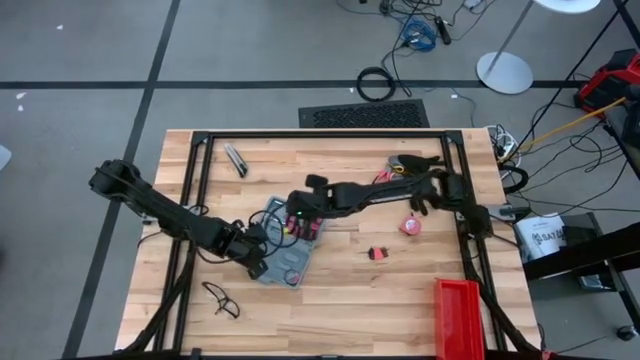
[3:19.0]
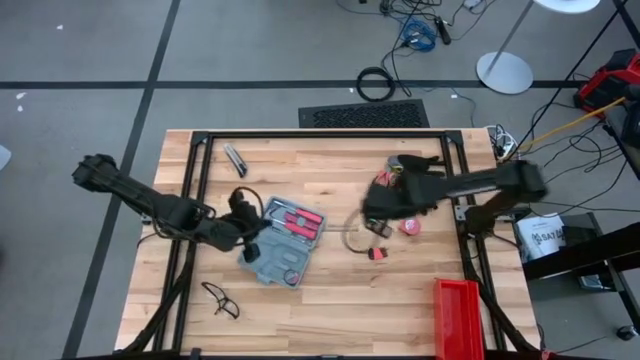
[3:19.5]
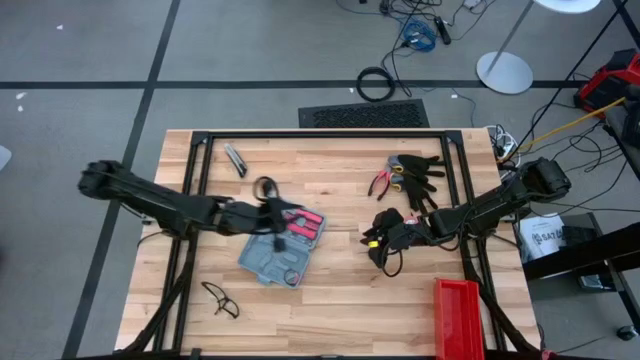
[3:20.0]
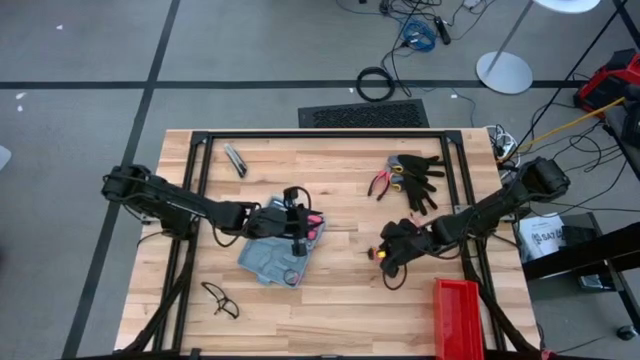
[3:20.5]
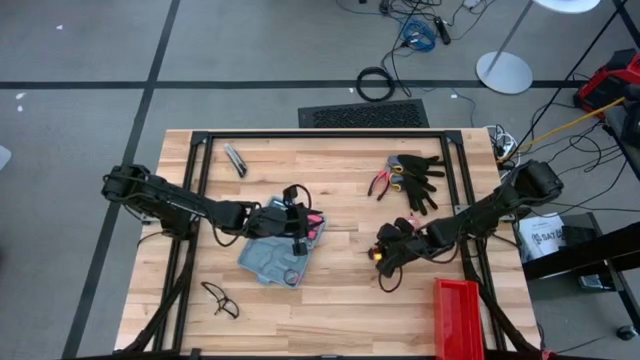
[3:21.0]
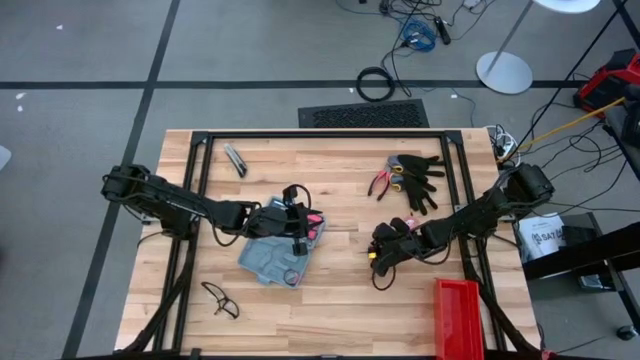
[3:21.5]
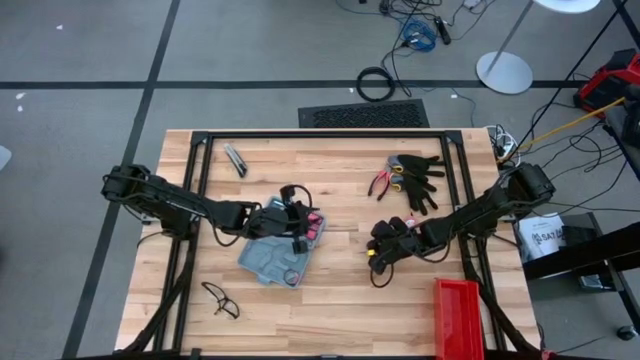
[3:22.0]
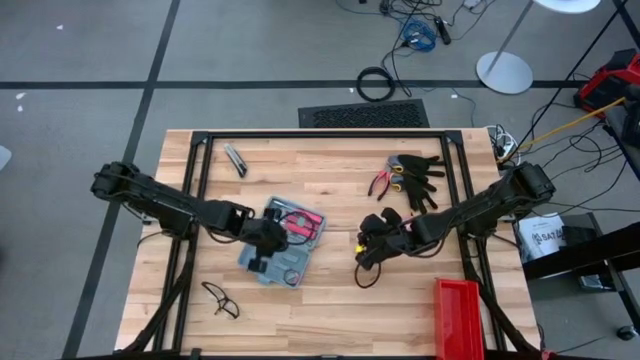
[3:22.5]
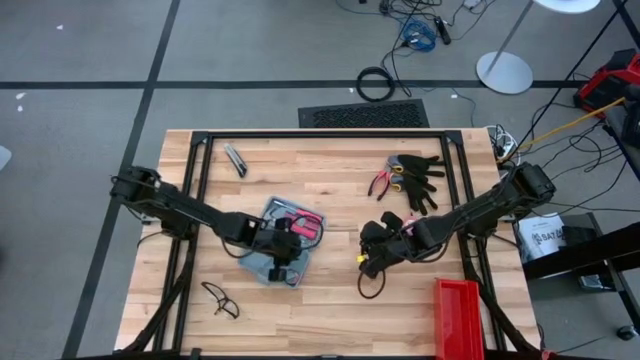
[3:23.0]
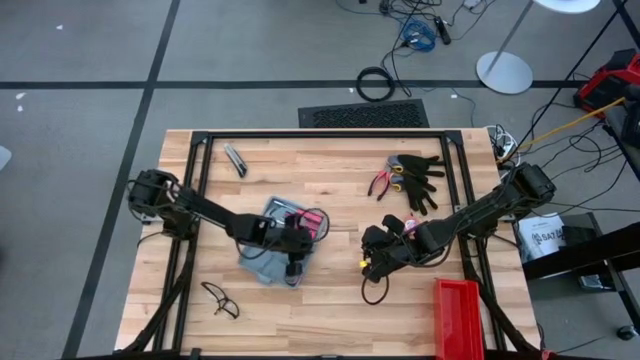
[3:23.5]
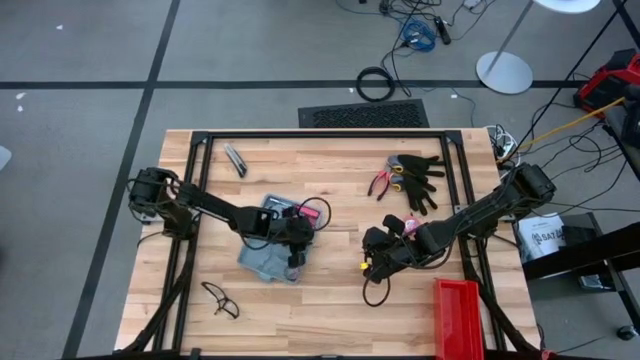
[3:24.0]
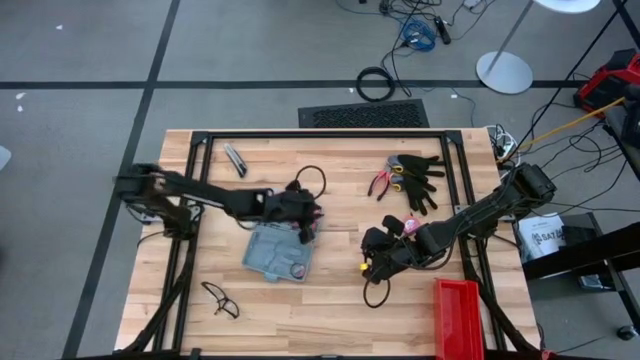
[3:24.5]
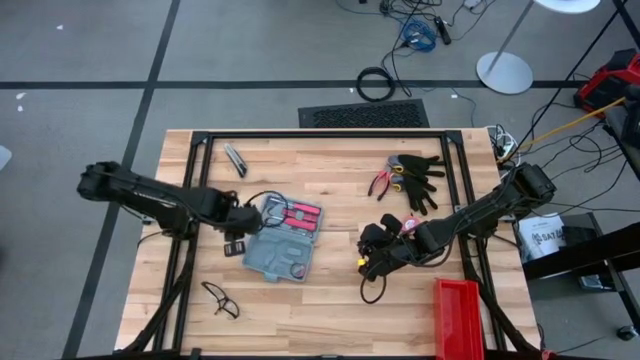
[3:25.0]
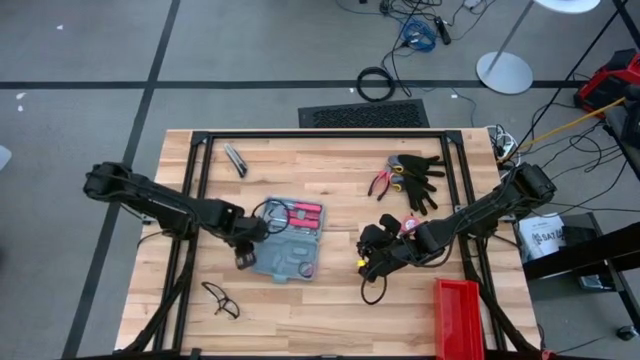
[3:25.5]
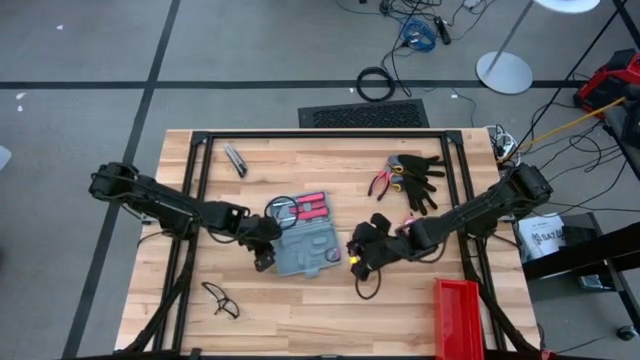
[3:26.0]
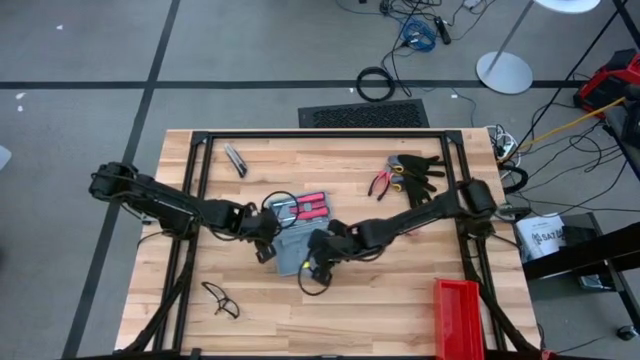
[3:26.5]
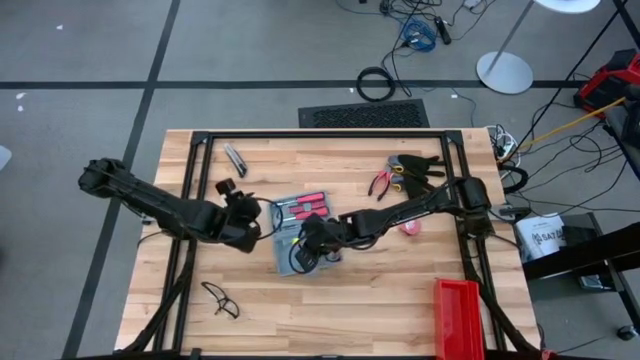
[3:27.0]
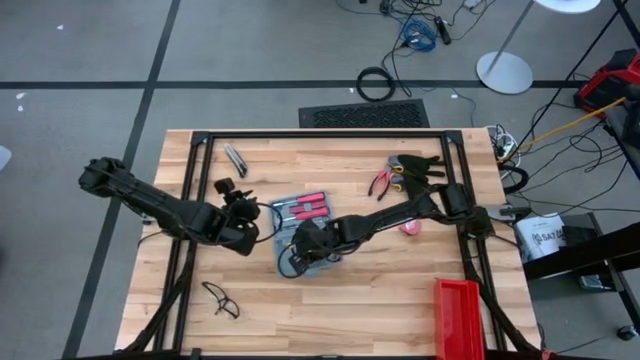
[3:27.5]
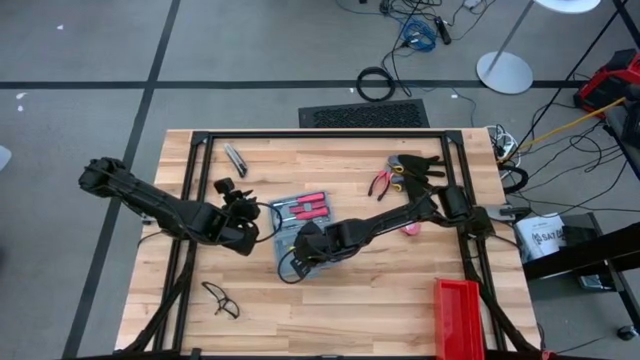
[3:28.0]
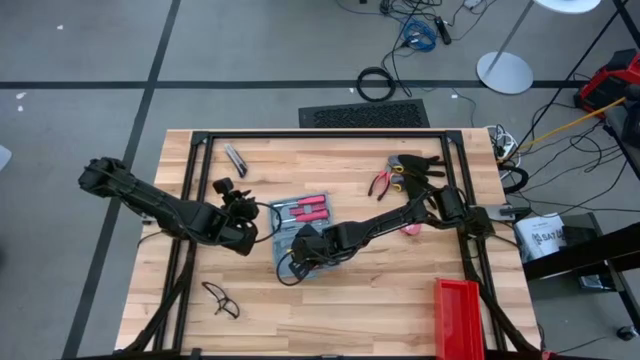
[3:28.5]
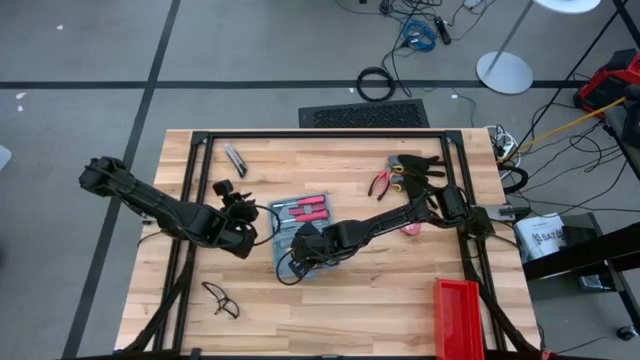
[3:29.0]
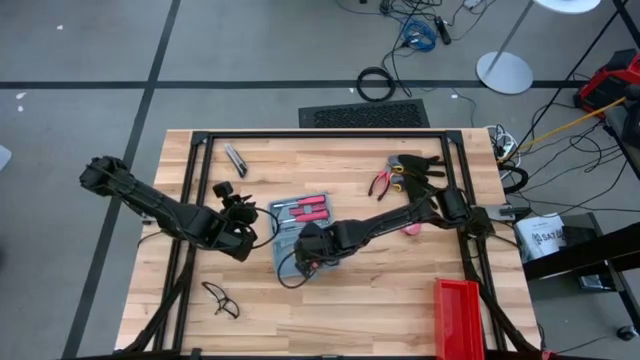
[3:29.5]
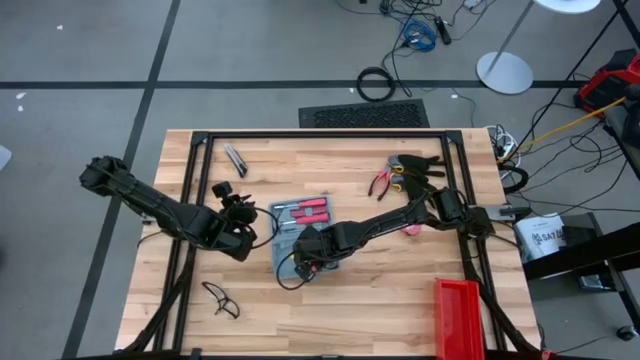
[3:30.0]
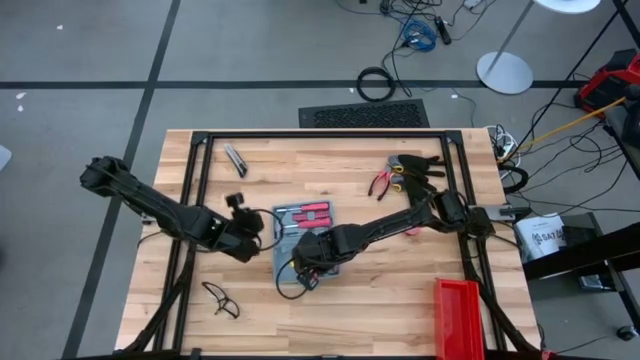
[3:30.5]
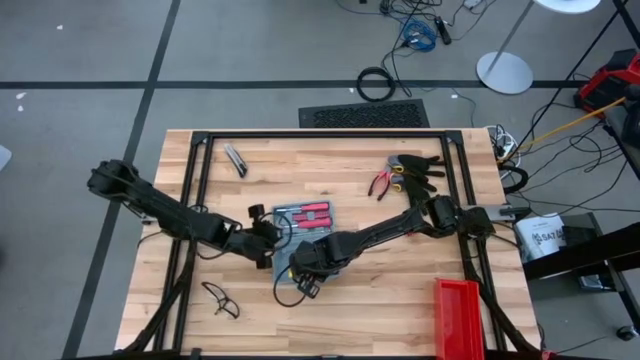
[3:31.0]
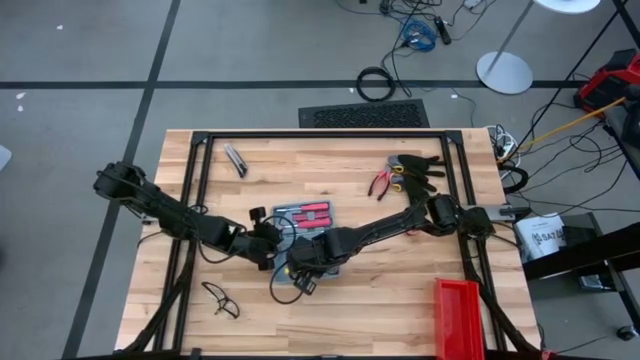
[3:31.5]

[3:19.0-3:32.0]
Task: prefit tool cases
Put the pink hex key into the gray prefit tool case

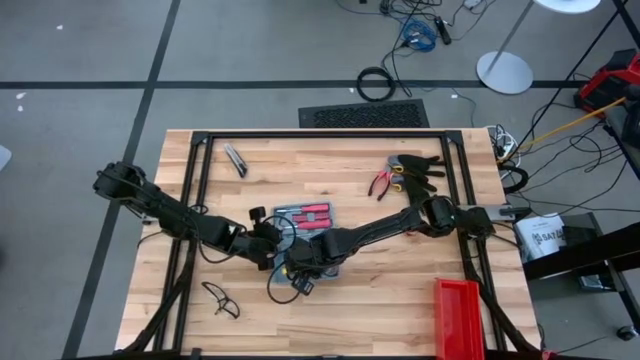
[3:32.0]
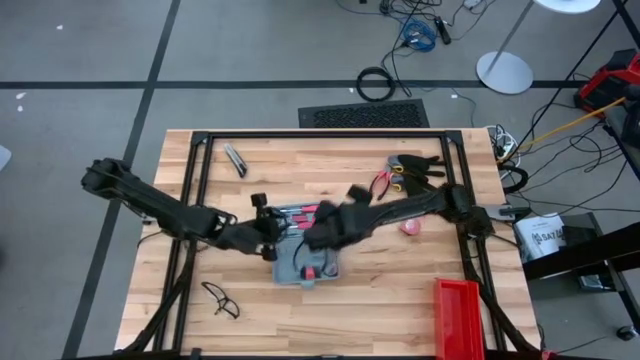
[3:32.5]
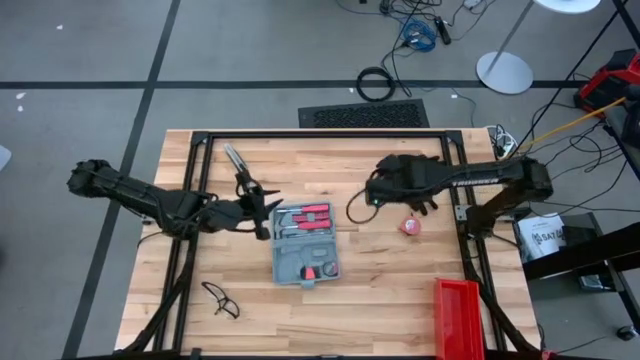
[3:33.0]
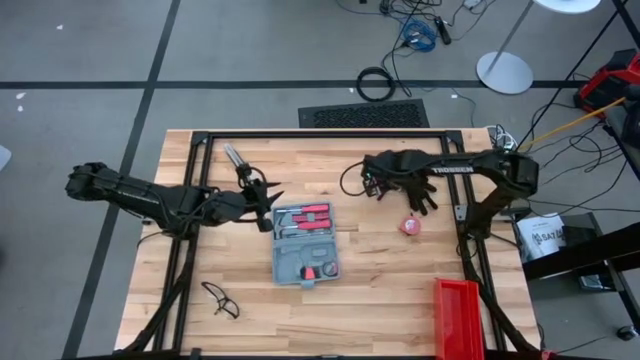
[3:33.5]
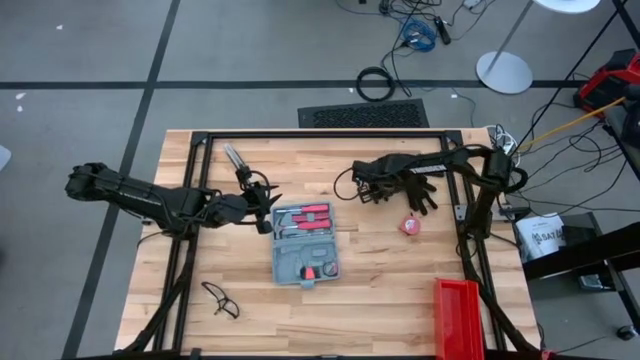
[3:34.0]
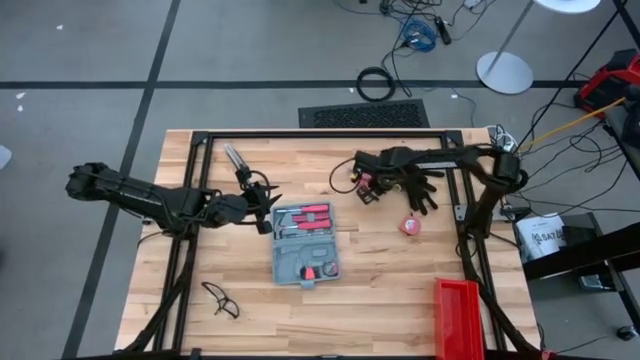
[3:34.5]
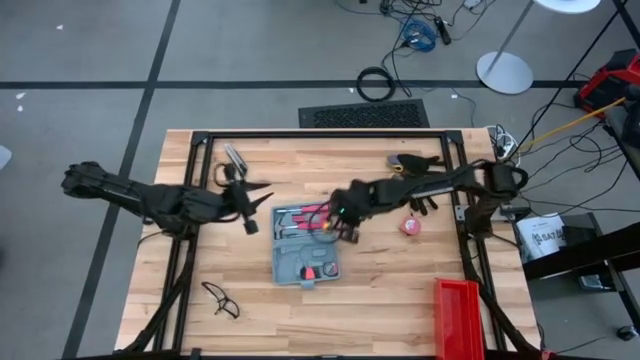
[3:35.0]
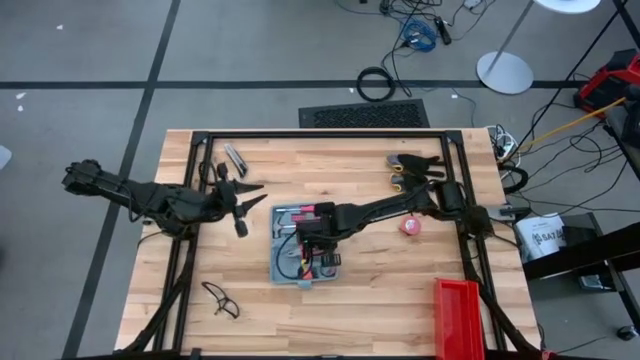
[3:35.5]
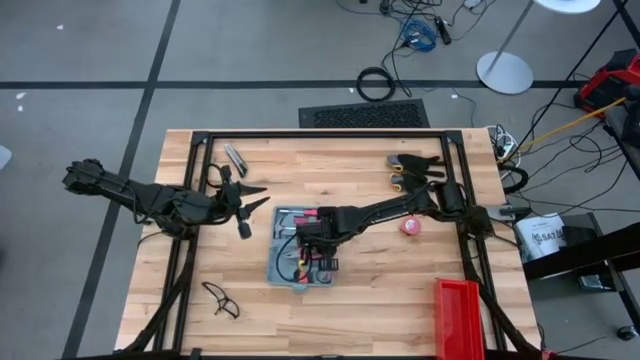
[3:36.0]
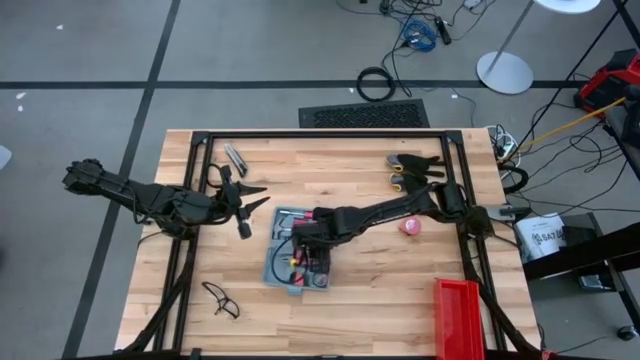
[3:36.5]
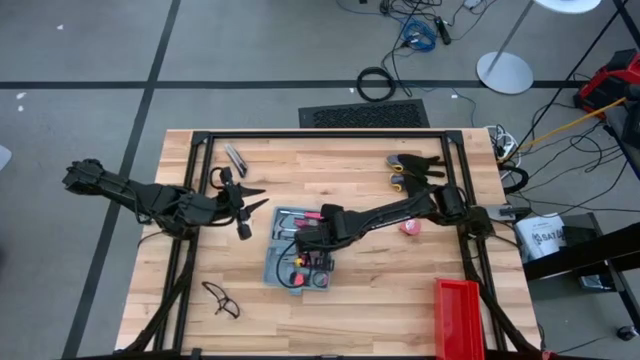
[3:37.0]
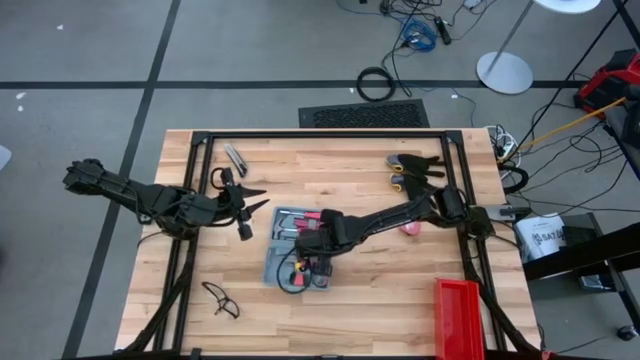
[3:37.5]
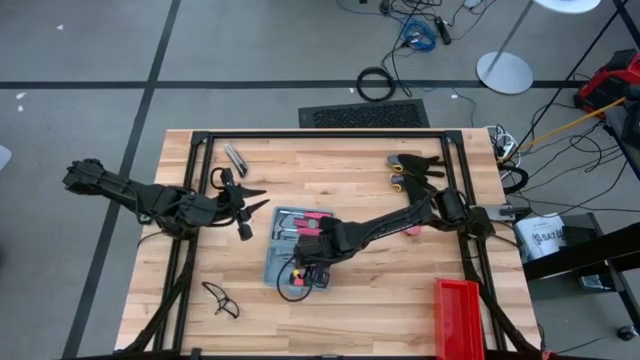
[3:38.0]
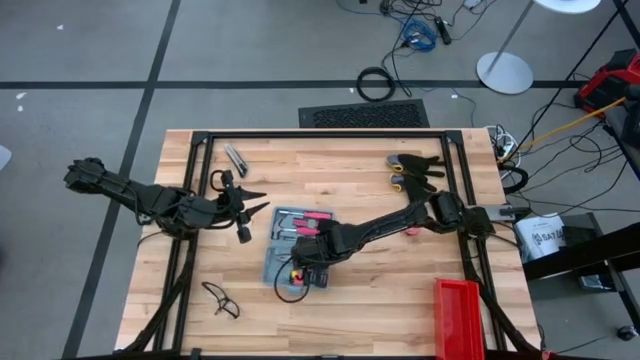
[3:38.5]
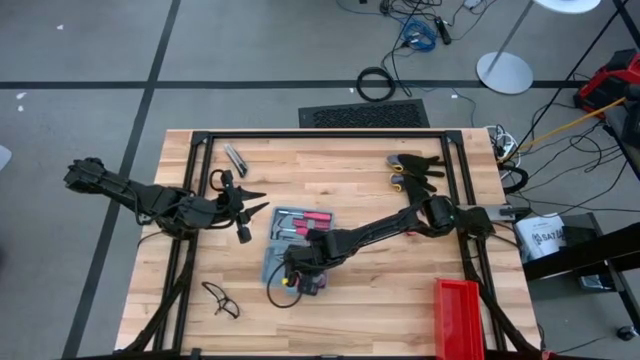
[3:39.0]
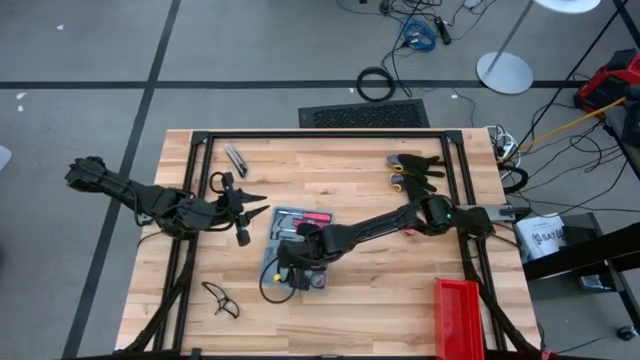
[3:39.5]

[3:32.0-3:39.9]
Put the pink plier into the gray prefit tool case
